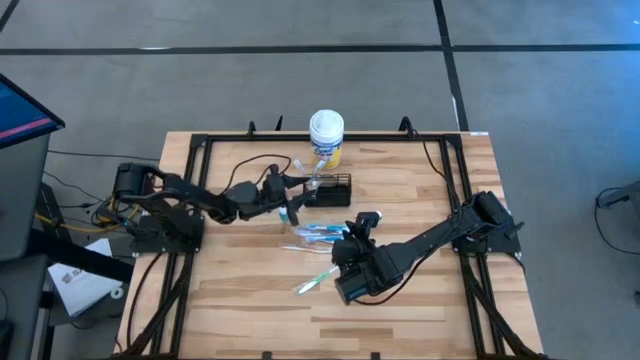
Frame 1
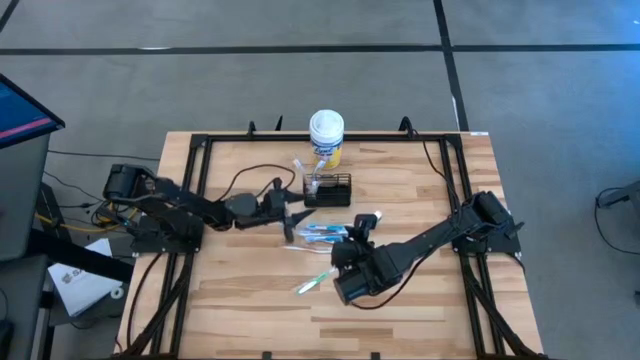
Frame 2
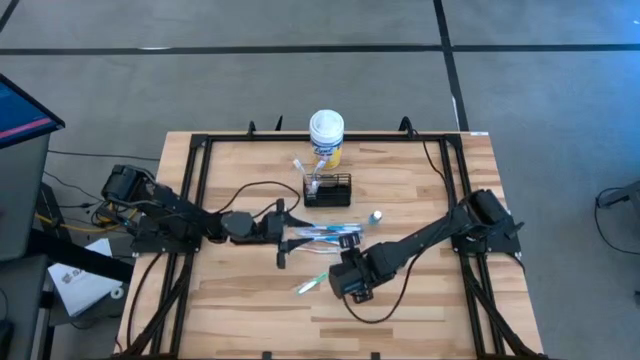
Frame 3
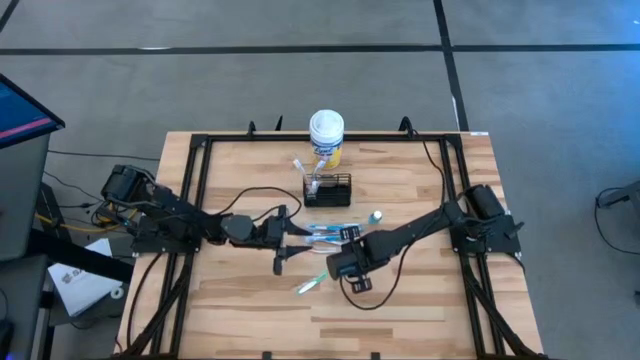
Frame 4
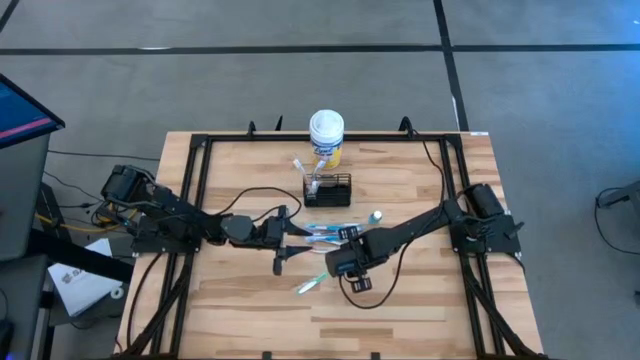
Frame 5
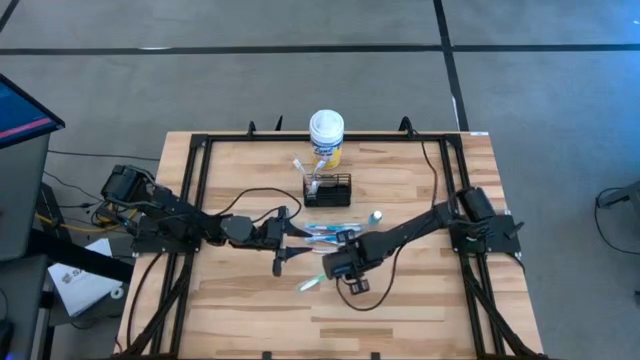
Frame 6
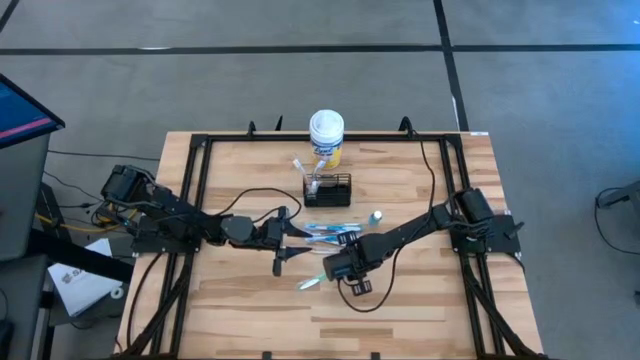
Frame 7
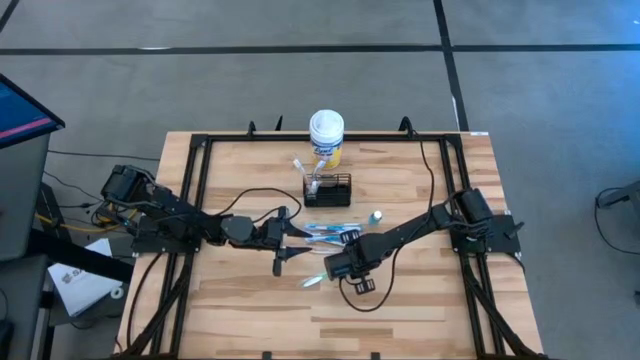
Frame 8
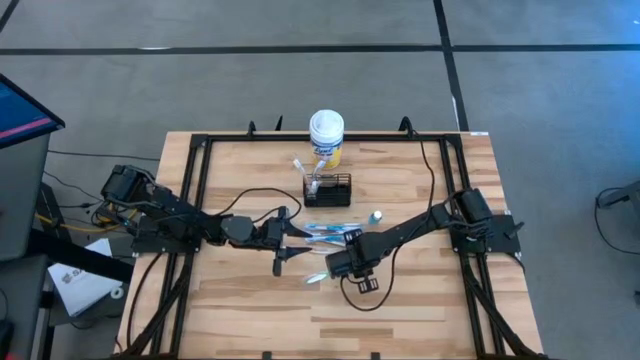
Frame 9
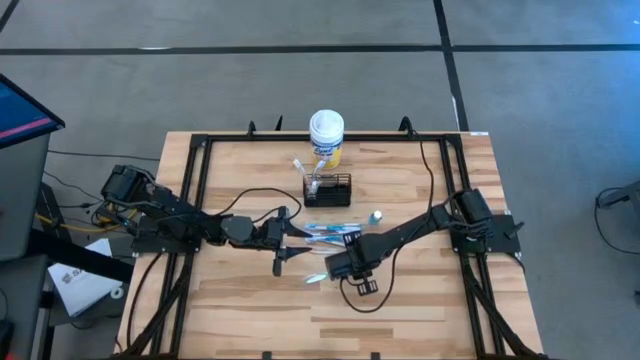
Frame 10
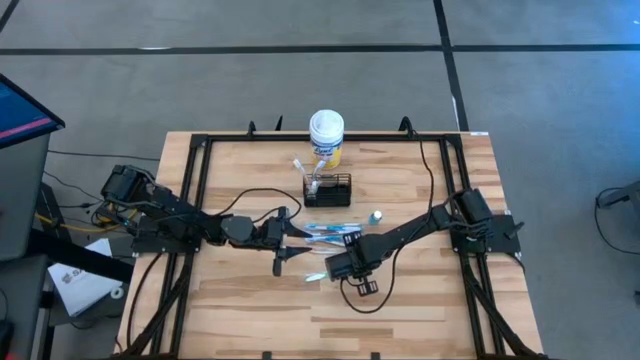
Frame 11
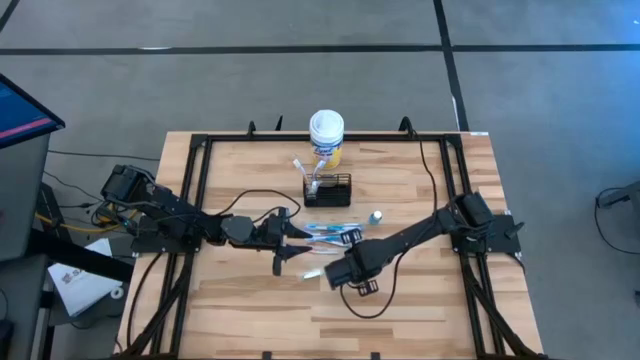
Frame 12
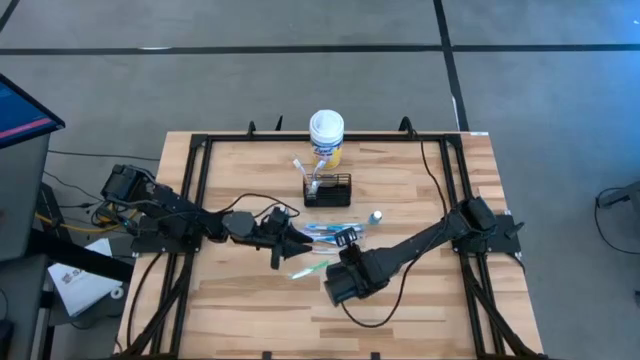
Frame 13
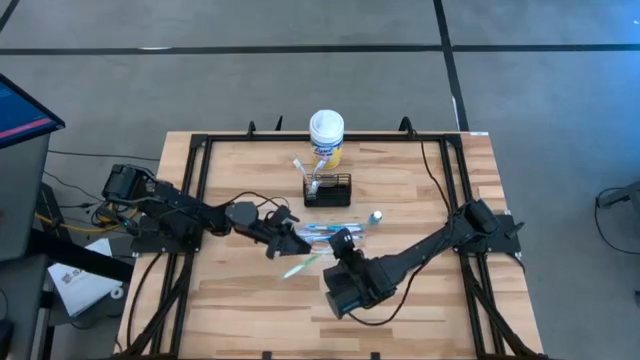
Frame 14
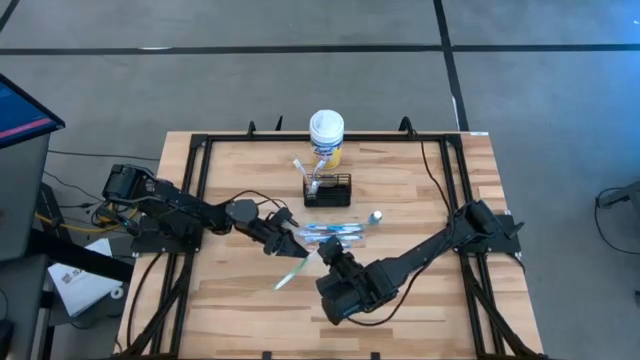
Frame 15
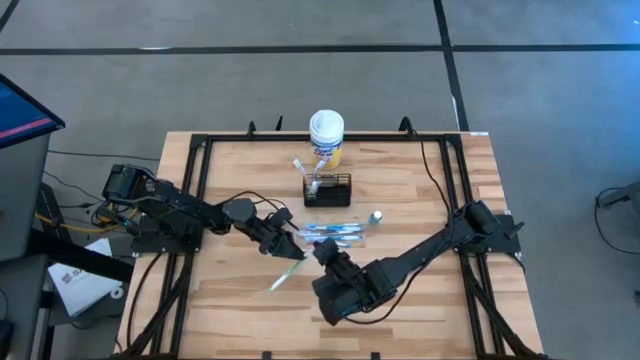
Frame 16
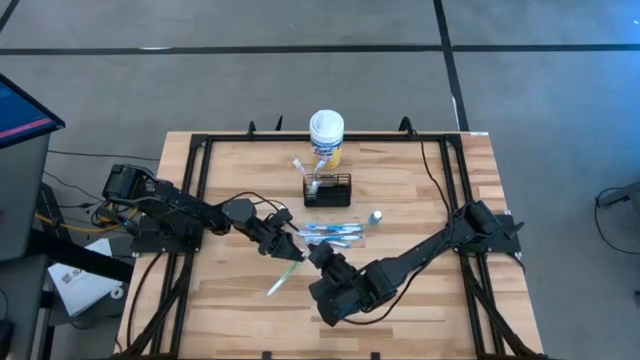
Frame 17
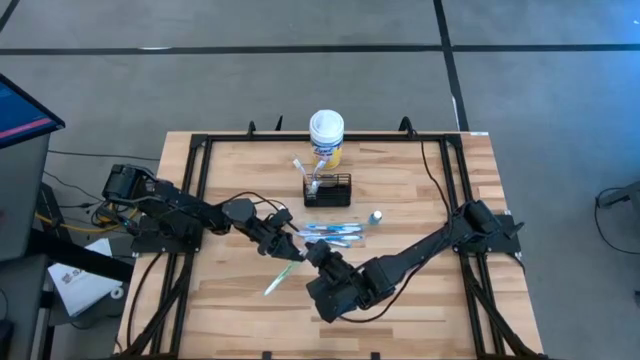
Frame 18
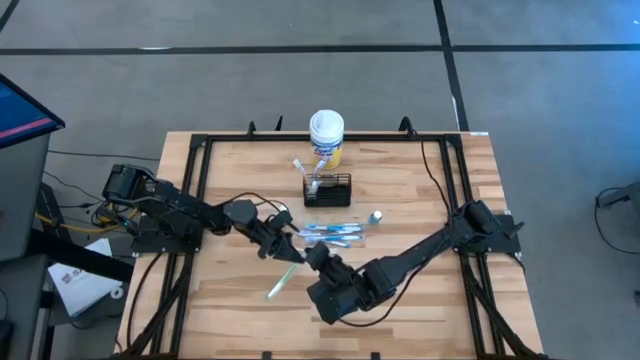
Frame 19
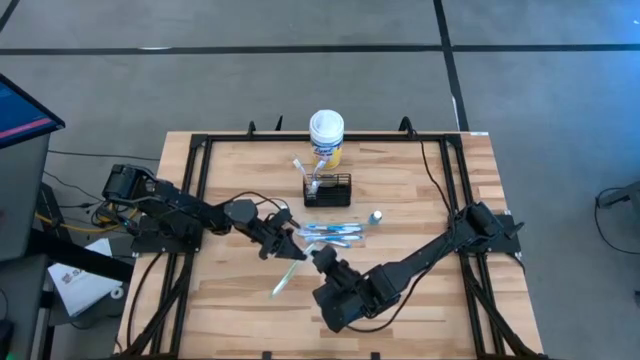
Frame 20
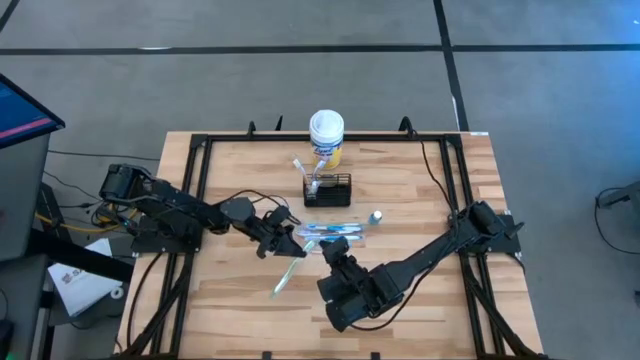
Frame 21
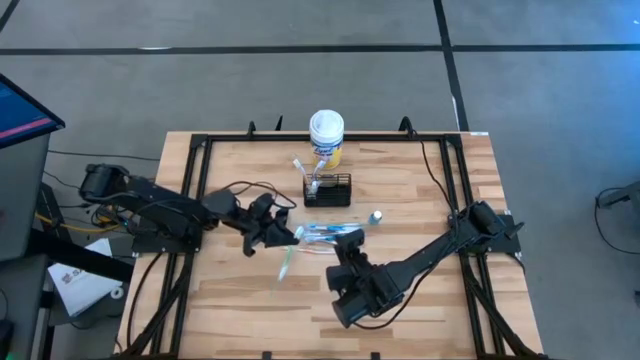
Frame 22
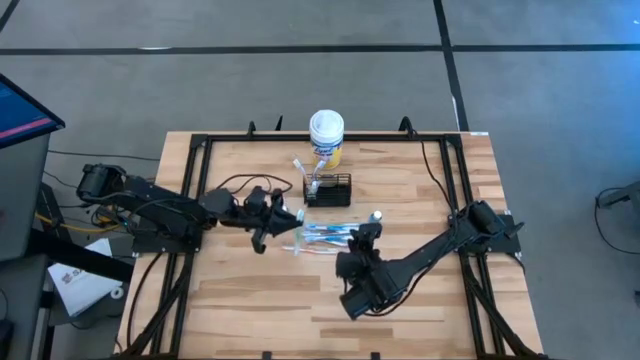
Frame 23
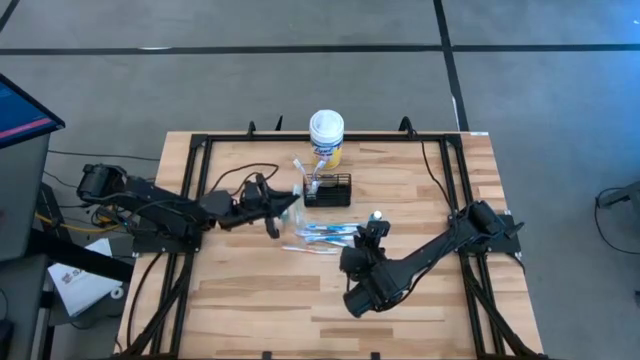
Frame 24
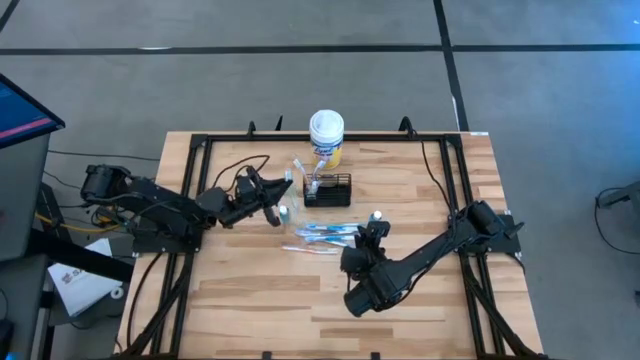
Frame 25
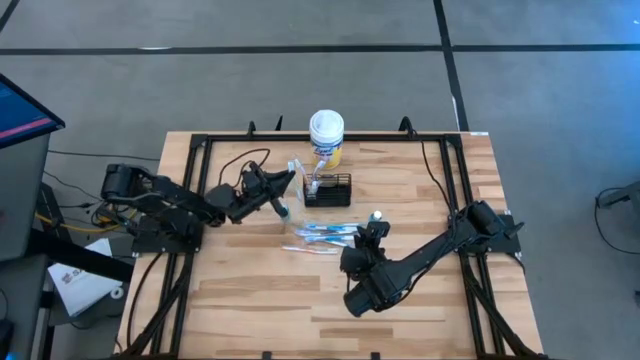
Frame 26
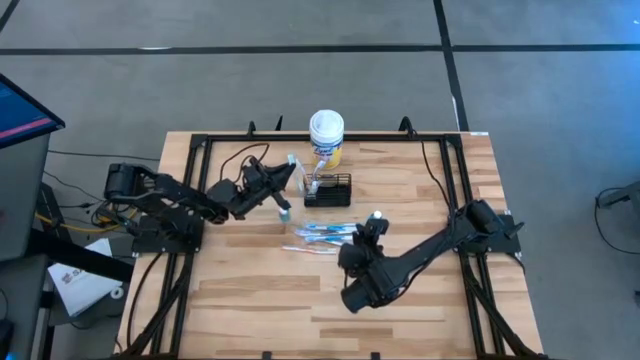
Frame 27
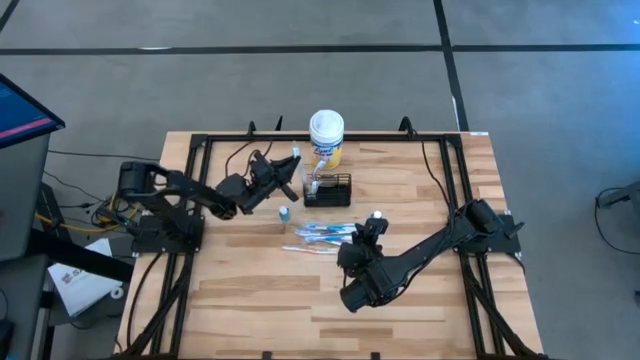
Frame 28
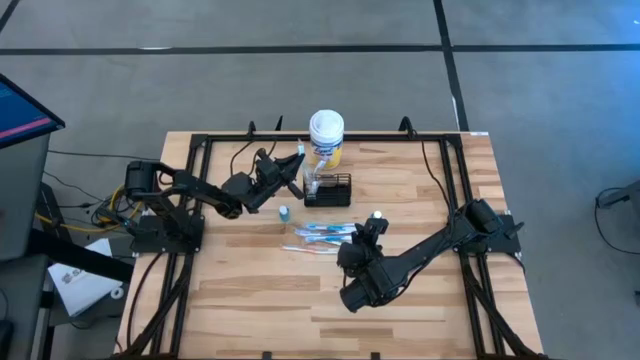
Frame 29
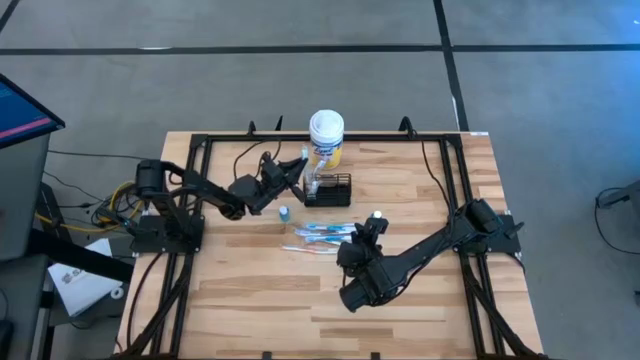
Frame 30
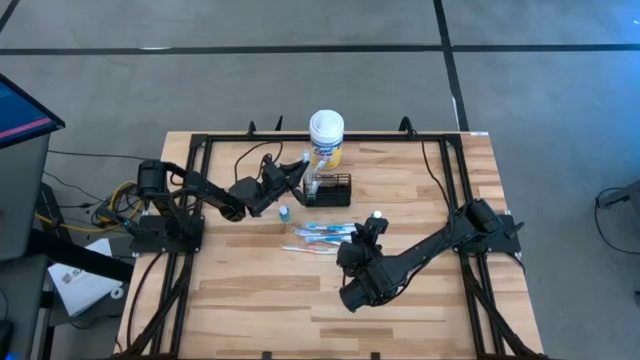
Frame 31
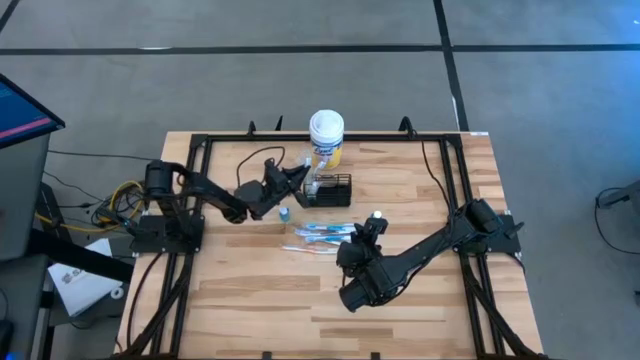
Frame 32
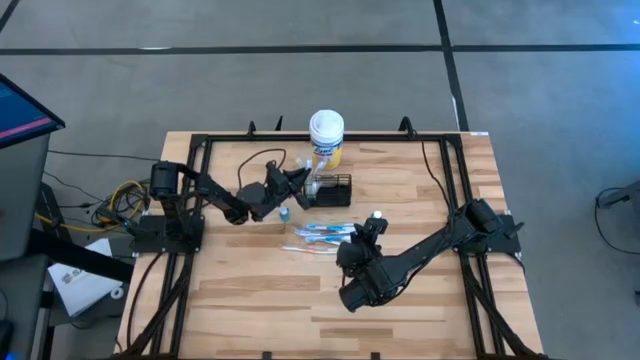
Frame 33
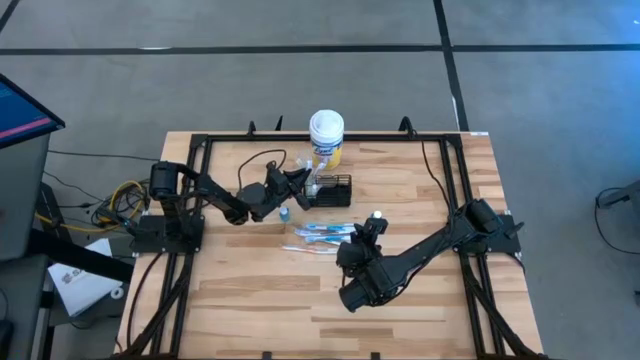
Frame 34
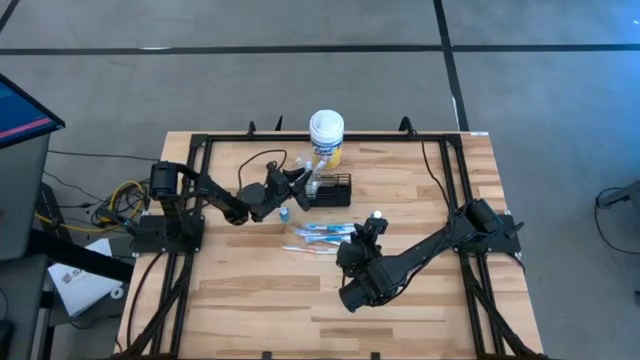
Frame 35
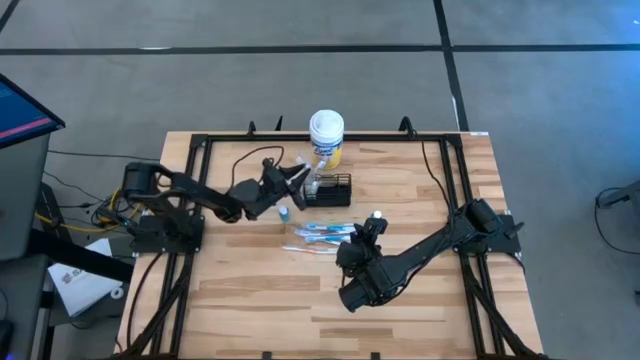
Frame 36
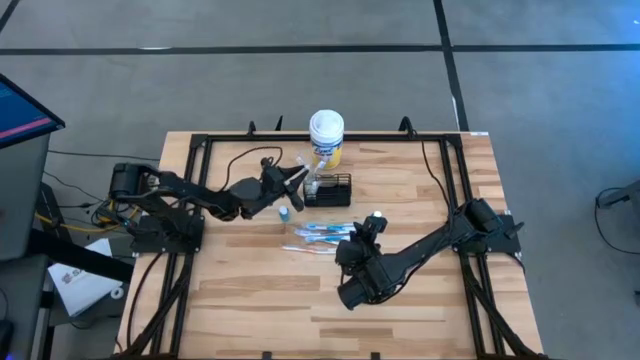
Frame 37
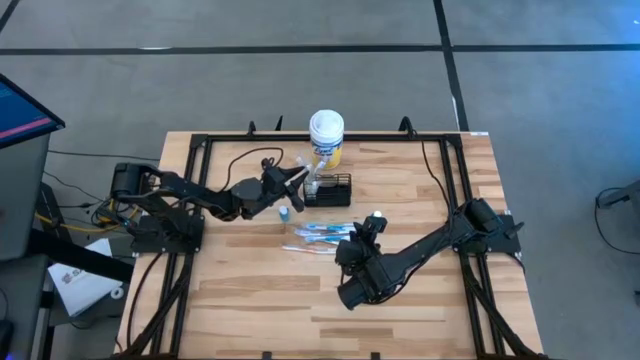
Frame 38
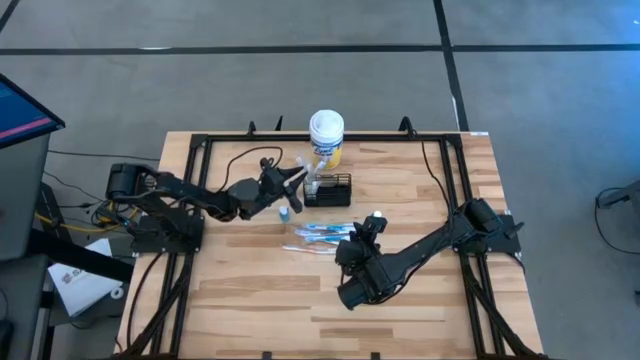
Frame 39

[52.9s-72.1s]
Task: Pick & Place toothbrushing station
Put the green toothbrush into the black wire organizer

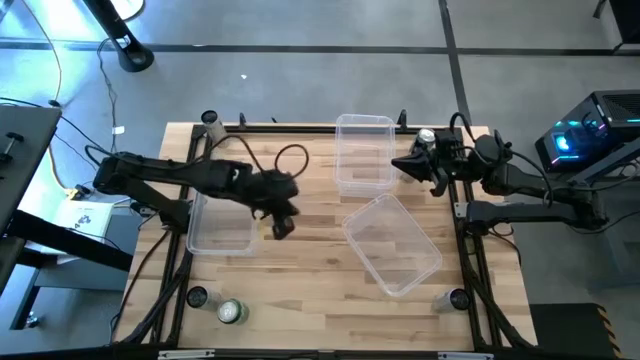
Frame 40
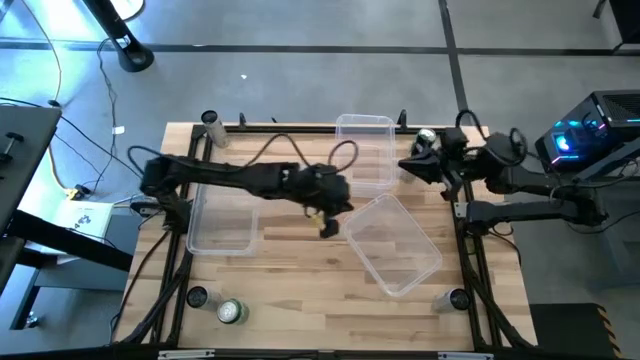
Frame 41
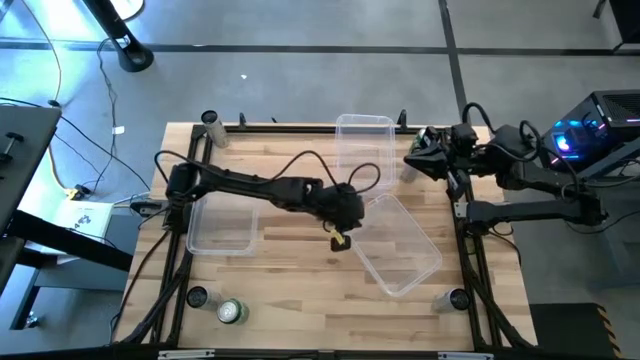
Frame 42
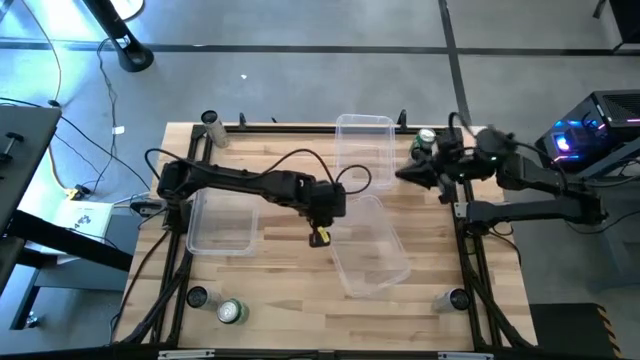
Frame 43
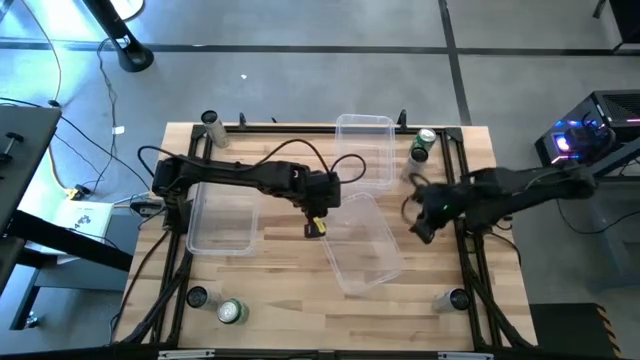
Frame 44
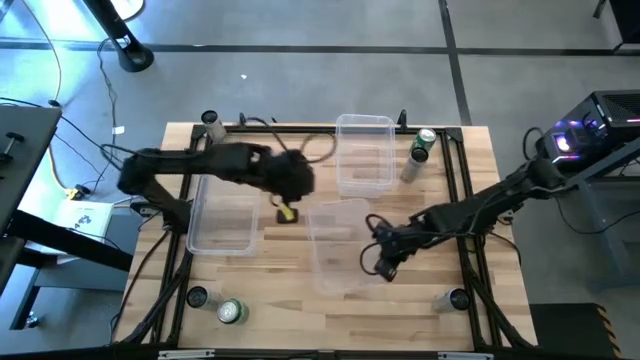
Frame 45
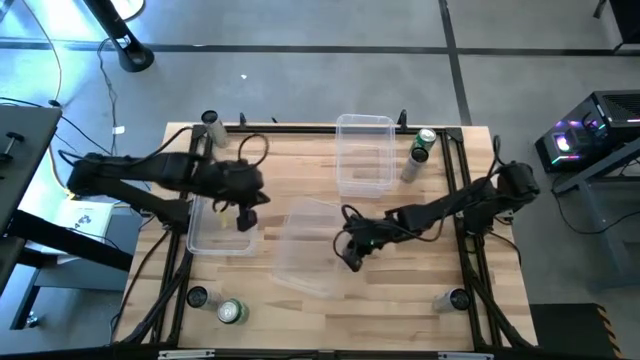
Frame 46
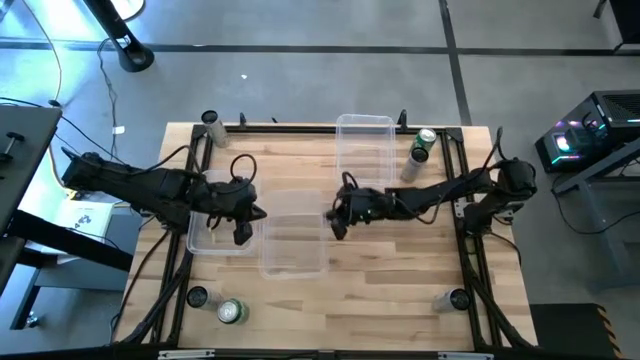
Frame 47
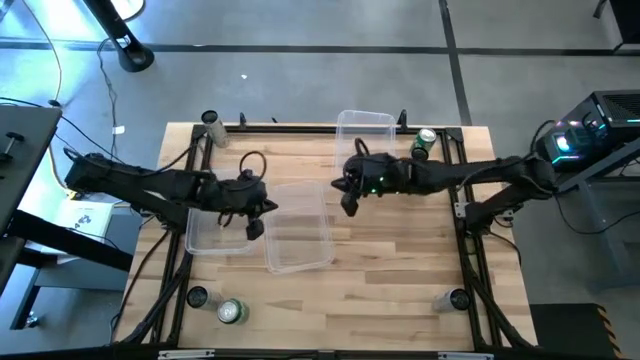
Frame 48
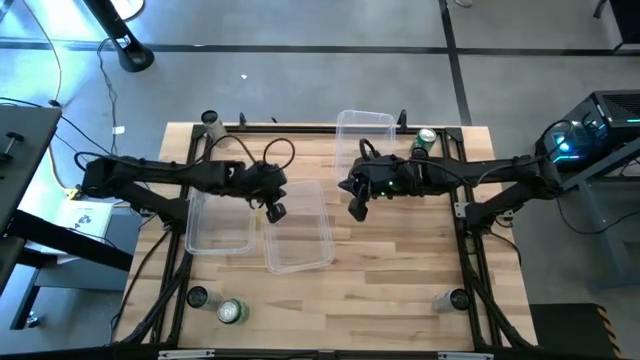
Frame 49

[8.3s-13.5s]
Task: Sort soda cans
Move the transparent container from the bottom right to the middle of the table
